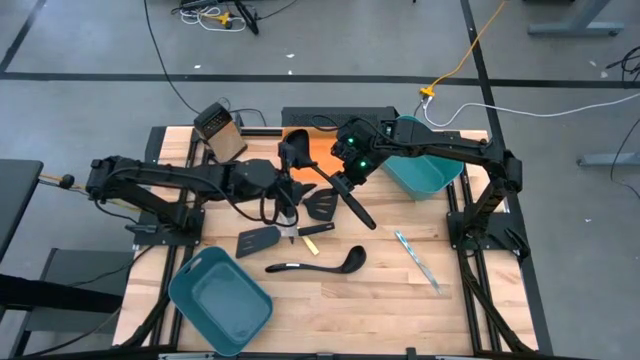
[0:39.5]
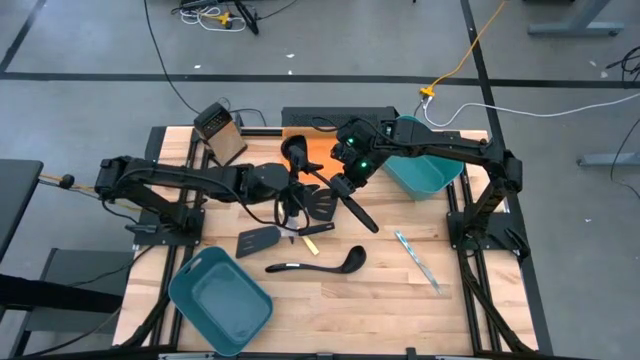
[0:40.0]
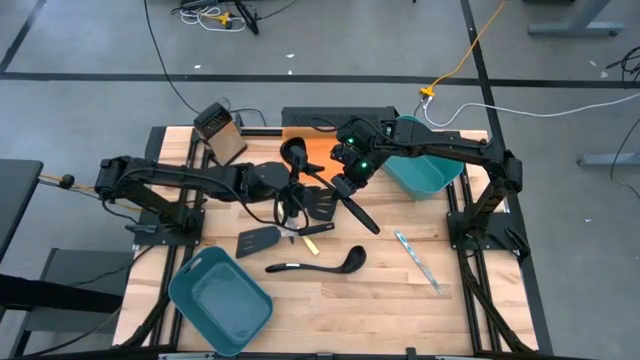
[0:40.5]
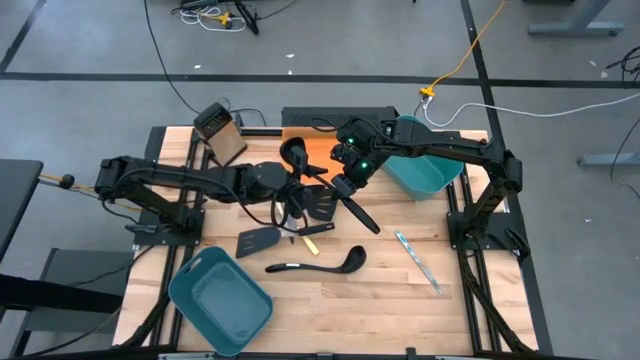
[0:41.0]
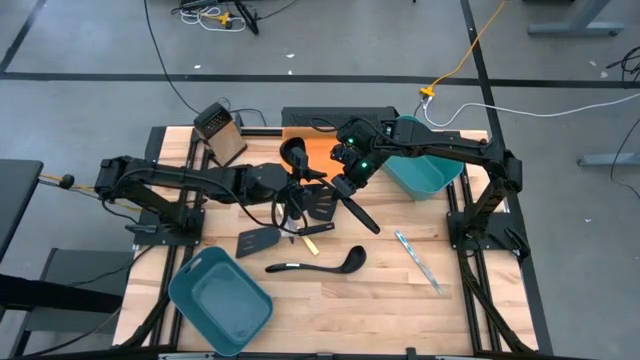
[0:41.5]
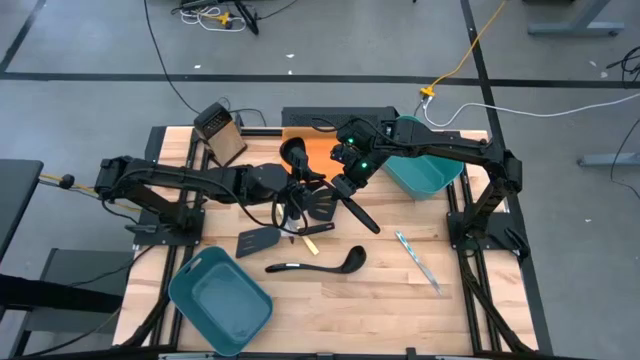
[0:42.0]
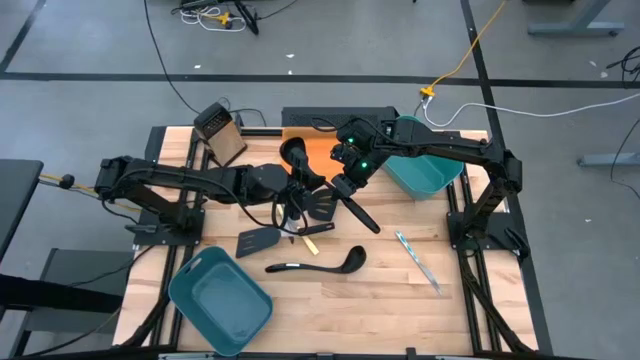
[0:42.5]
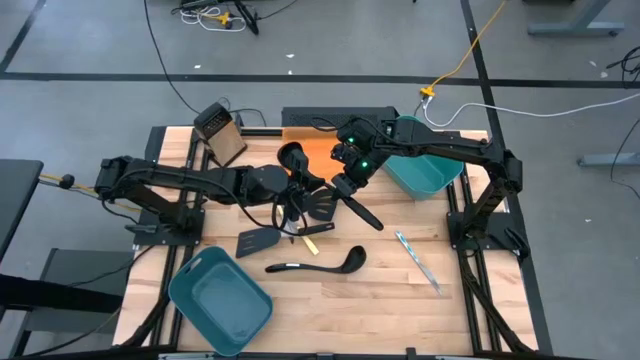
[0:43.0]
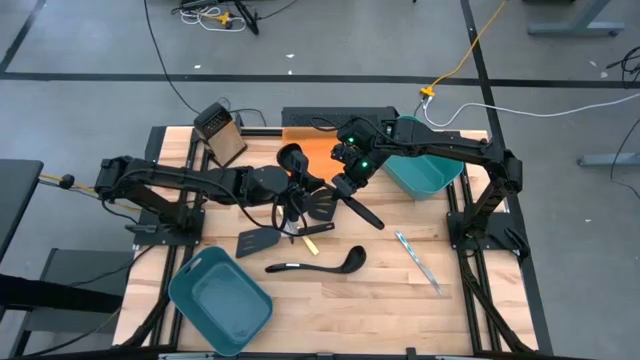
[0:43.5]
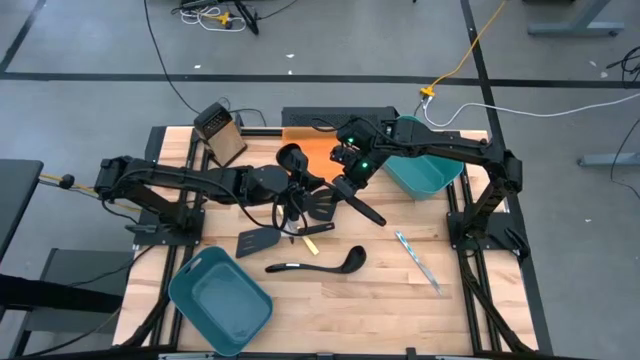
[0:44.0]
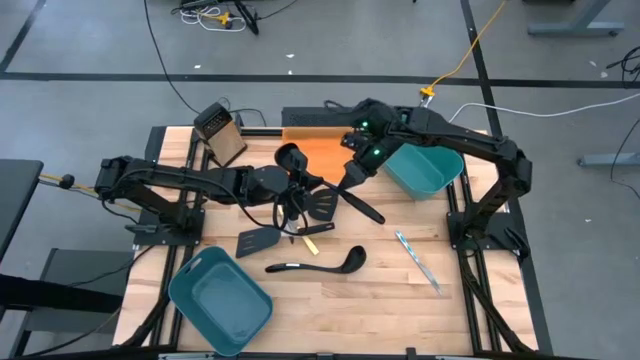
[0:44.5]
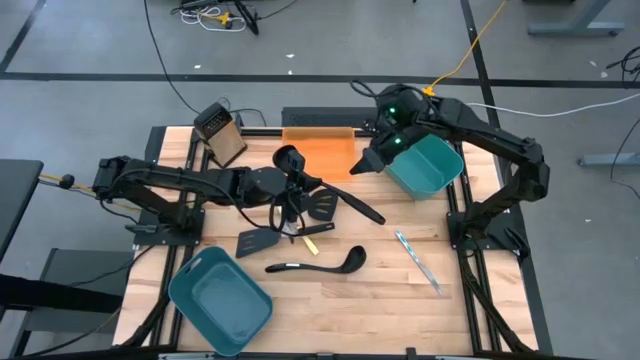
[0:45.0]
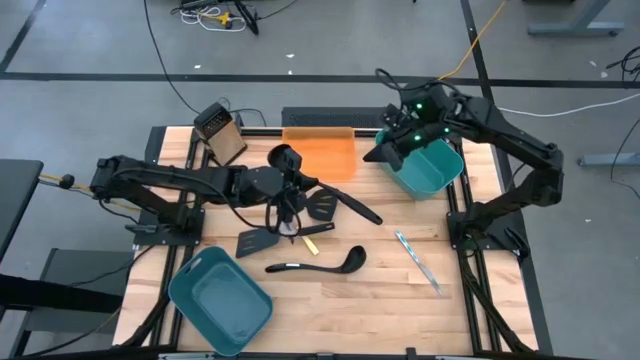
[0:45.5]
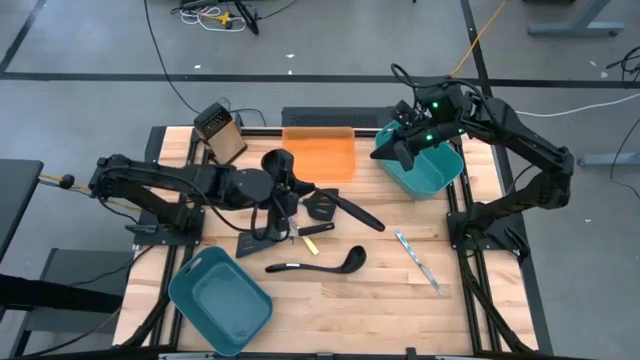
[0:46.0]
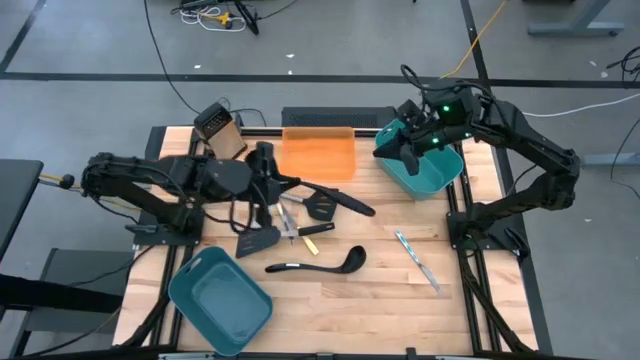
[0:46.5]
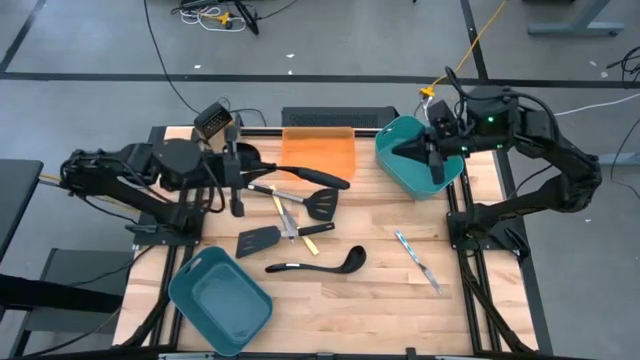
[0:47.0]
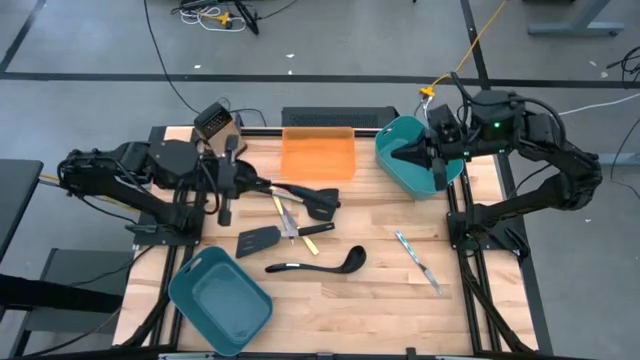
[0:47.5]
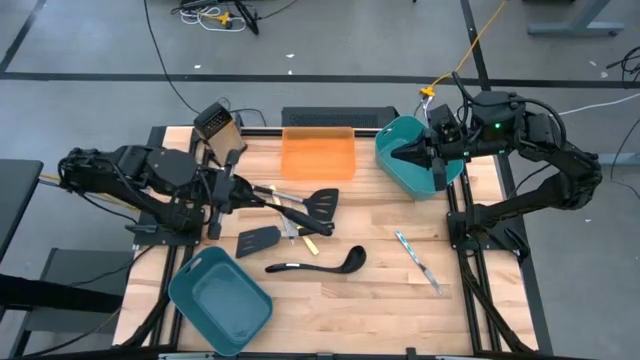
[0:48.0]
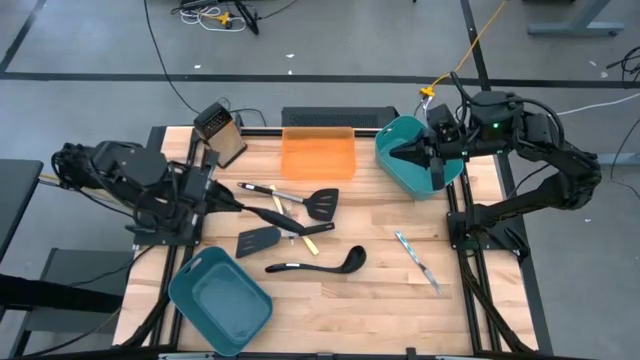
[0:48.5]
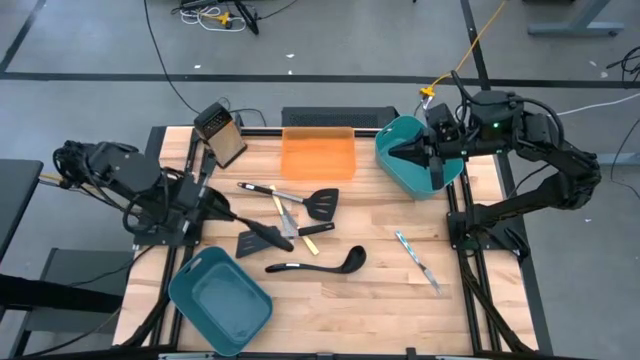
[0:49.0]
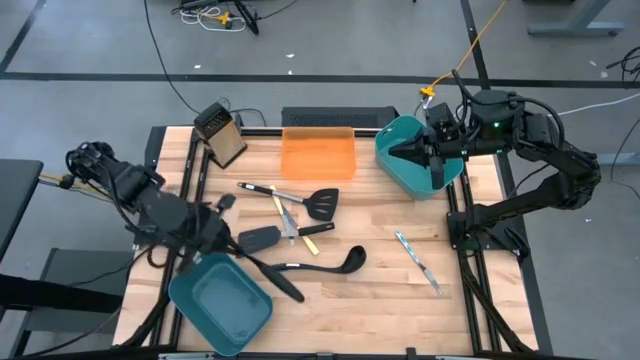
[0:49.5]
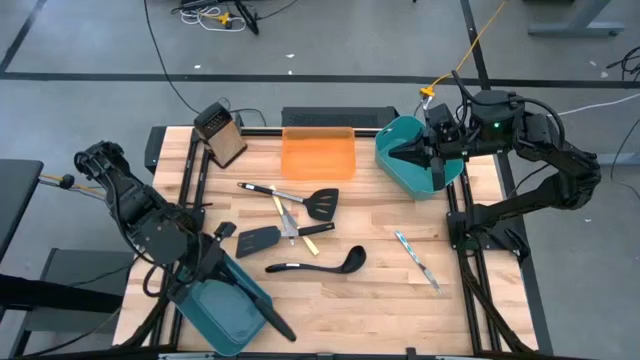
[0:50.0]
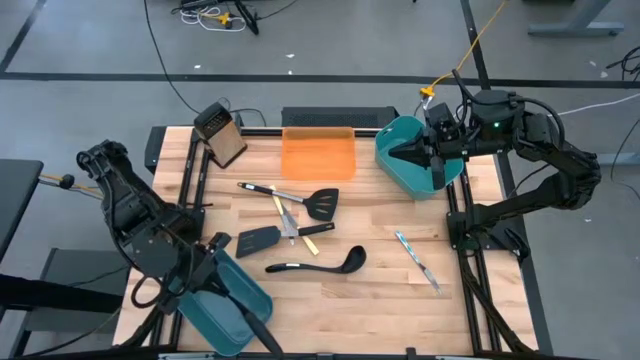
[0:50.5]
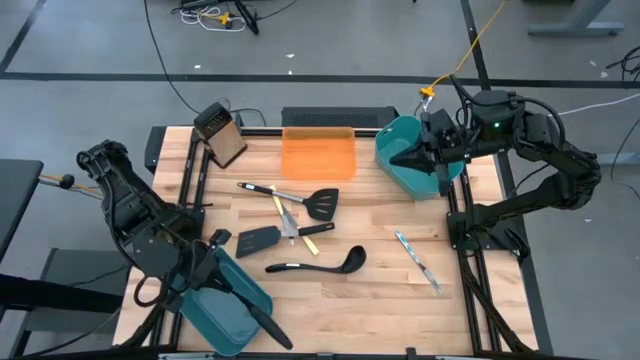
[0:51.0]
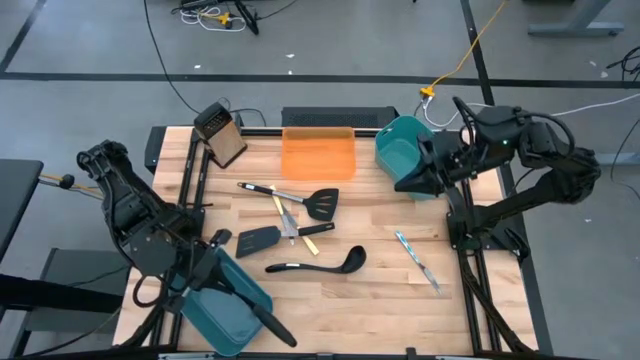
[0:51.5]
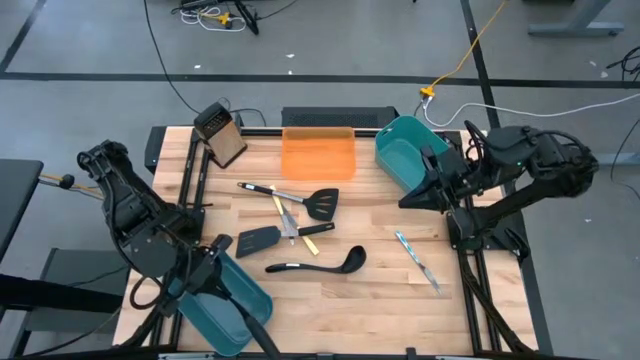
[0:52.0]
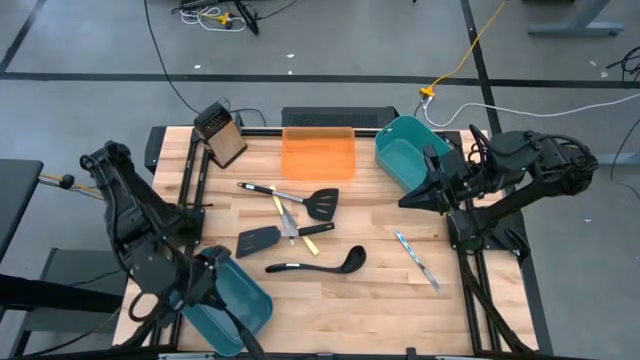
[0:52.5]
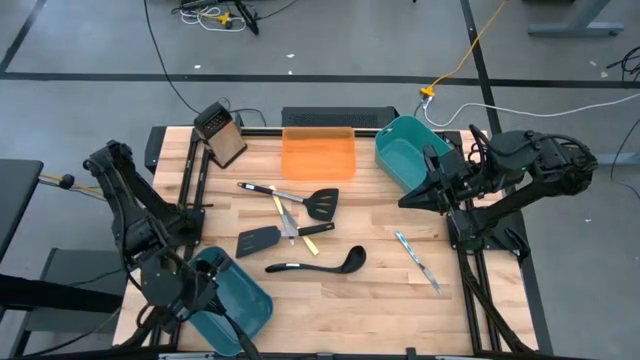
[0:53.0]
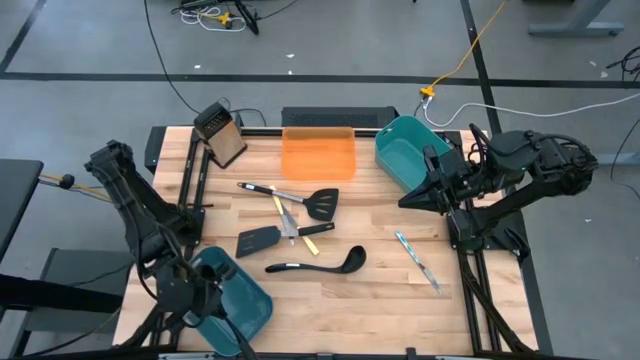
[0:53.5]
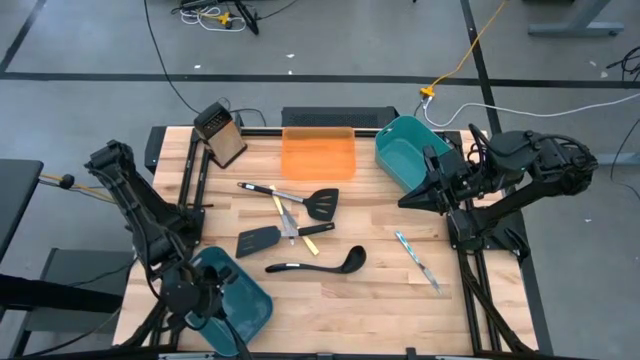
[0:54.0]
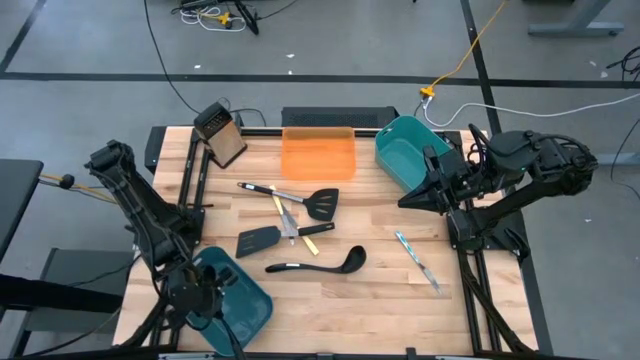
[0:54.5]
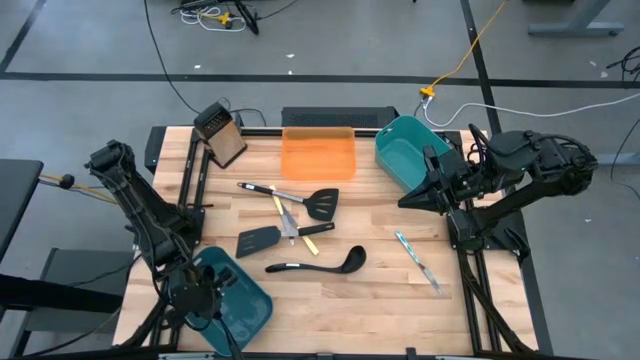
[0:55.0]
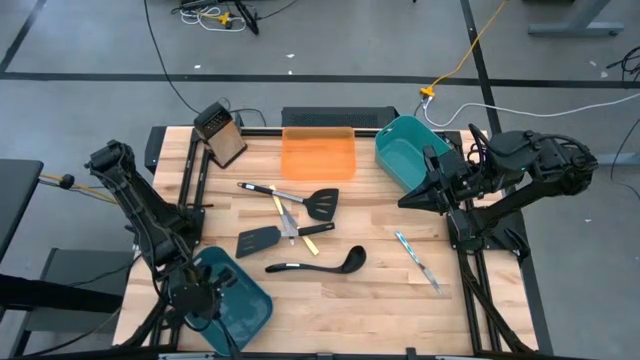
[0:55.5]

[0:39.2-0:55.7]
Task: Pick & Place Kitchen Items
Put the right black ladle into the blue bin

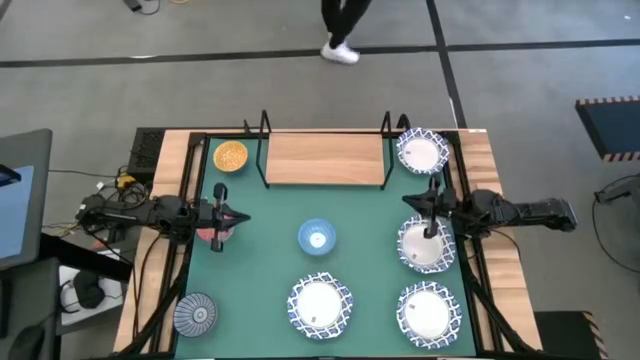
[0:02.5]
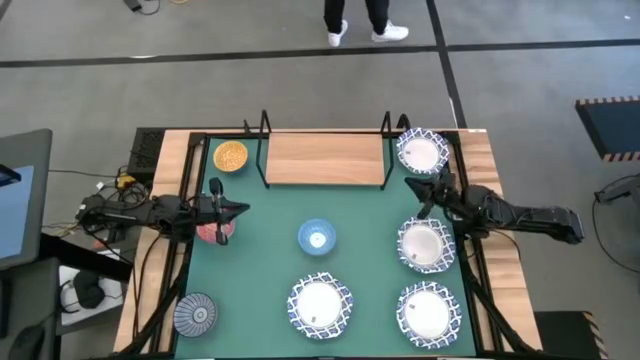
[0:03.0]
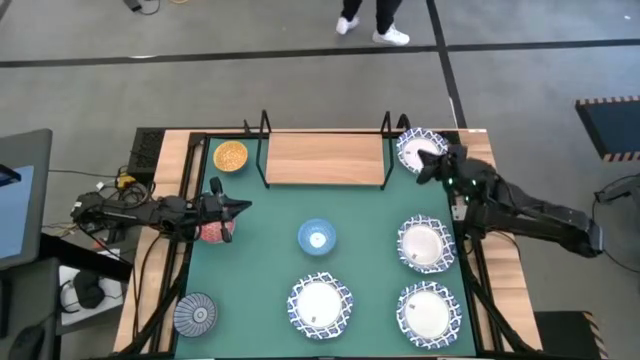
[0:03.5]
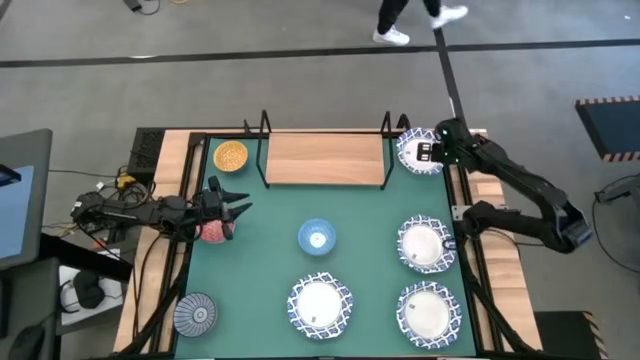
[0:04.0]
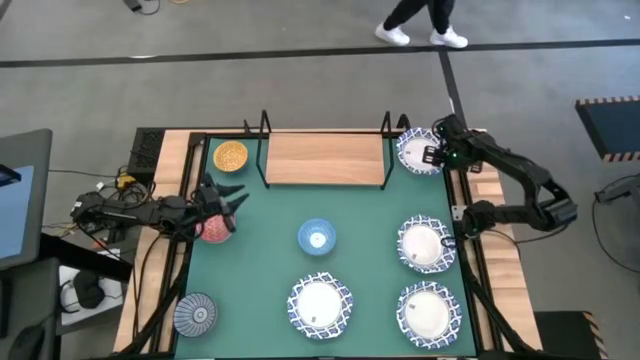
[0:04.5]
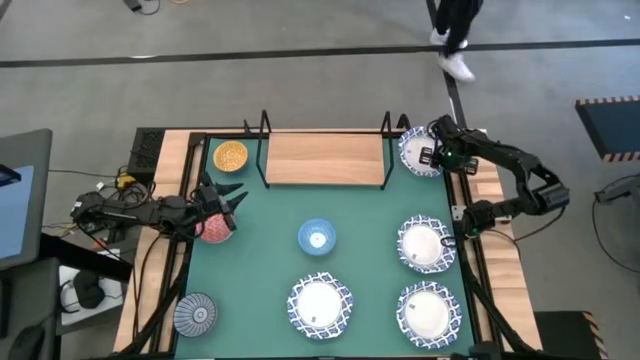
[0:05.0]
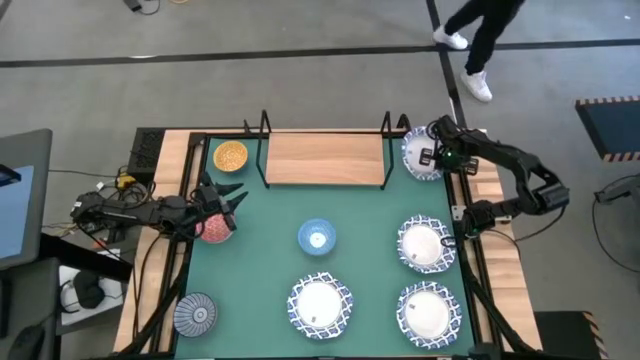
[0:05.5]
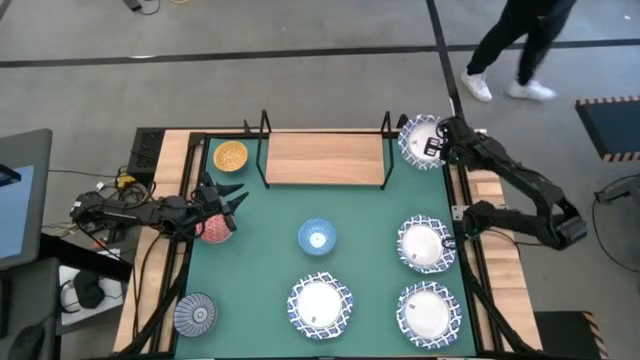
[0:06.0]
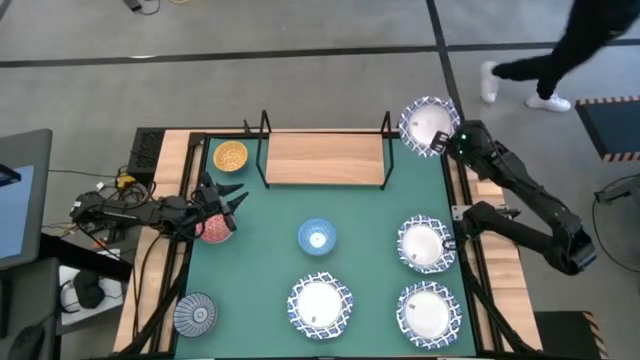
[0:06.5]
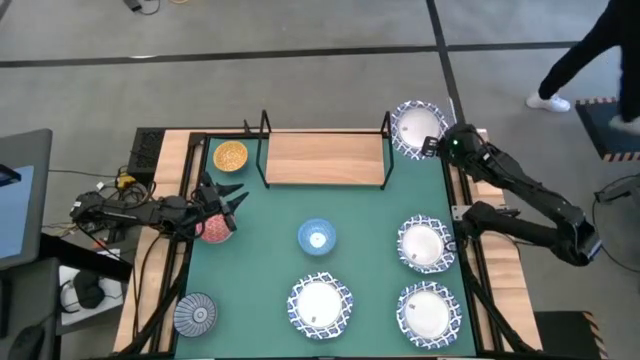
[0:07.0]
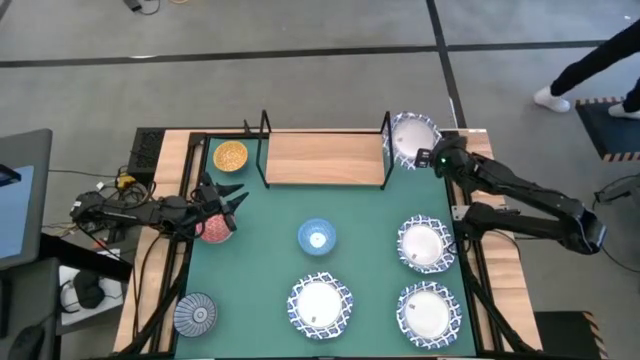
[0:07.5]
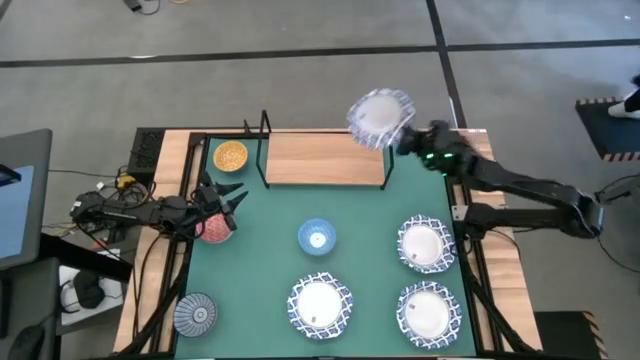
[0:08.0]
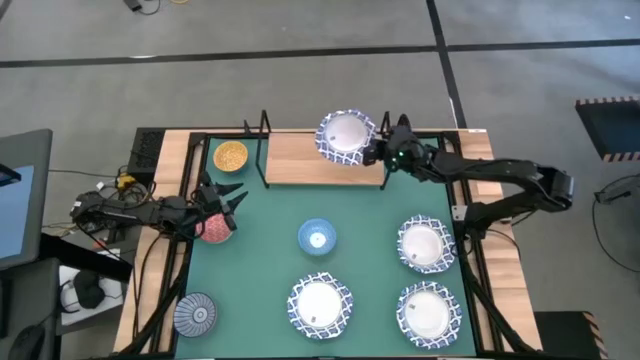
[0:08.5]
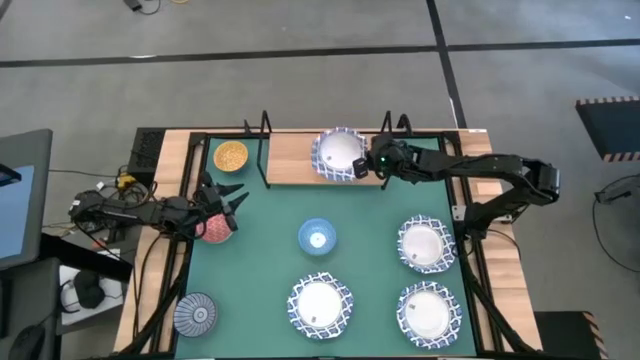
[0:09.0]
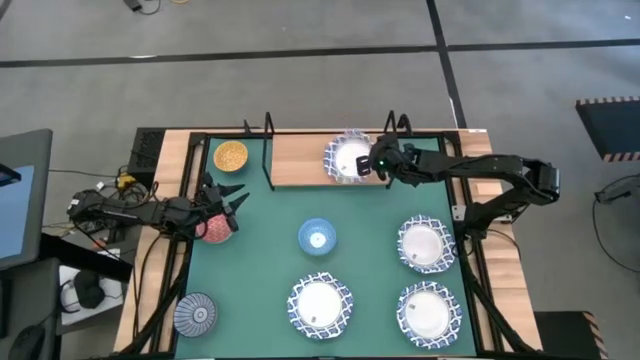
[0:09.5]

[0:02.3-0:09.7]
Task: Place and stack bowls onto a shelf
Put the white patterned bowl on the shelf
